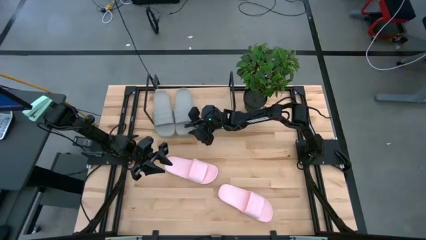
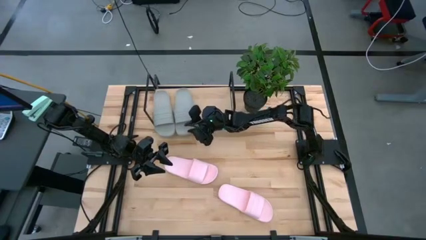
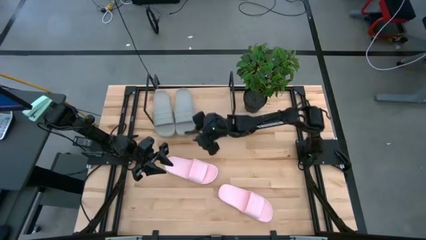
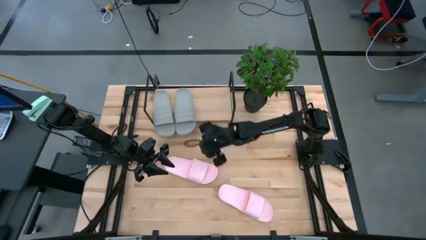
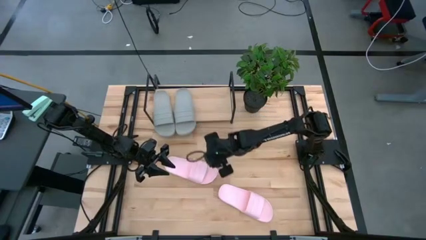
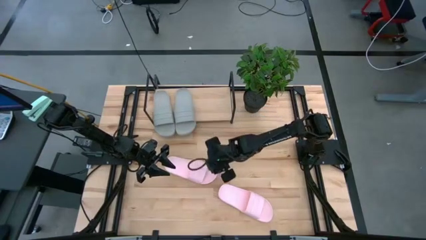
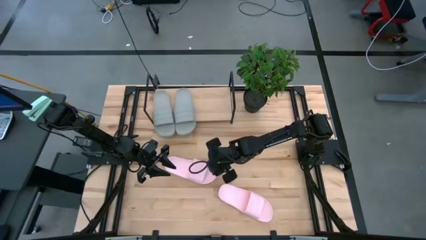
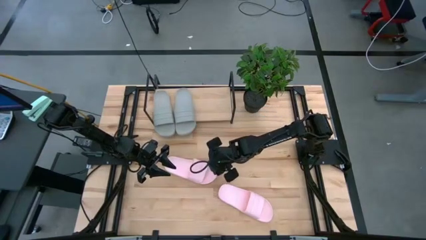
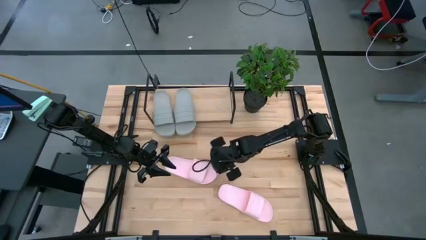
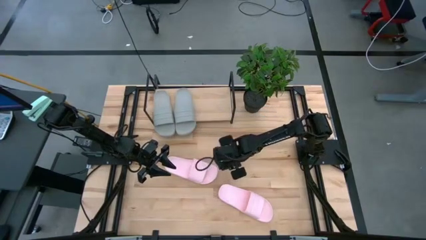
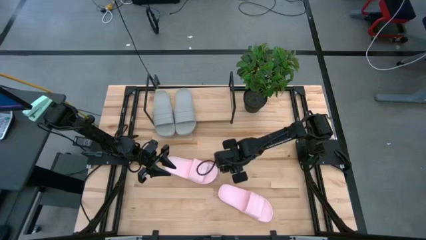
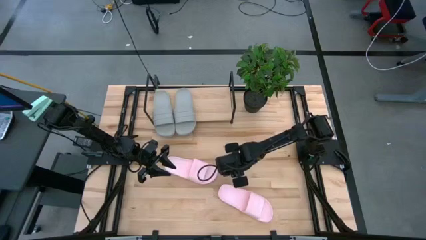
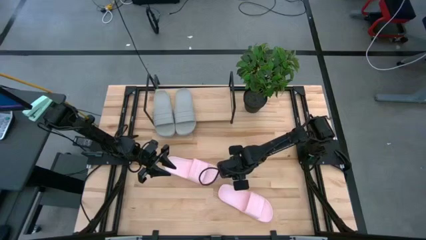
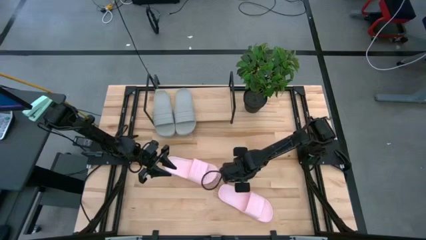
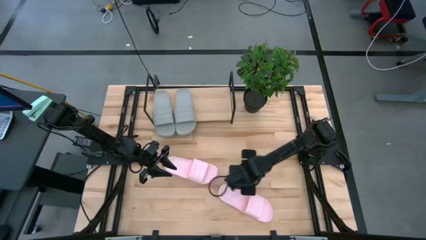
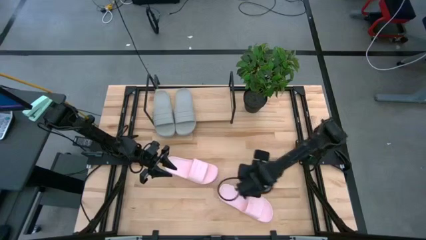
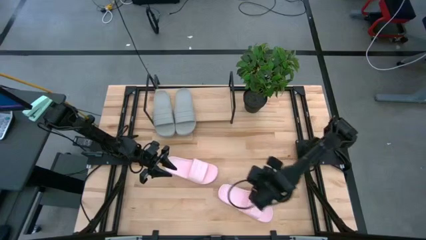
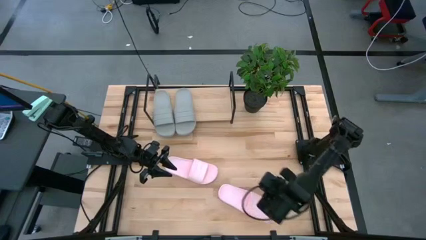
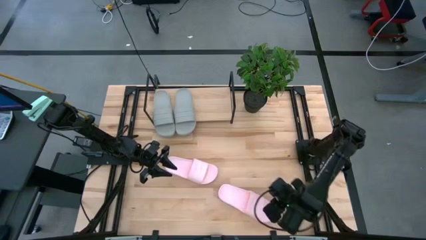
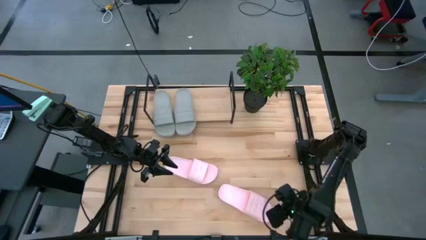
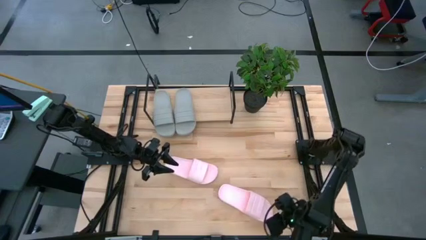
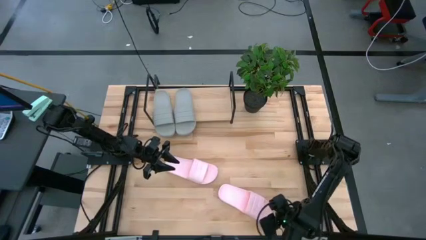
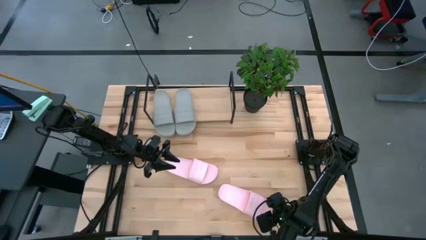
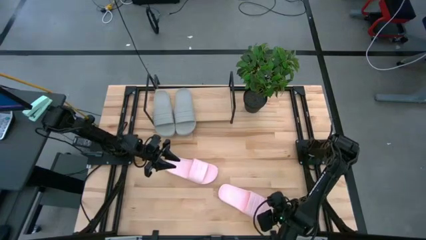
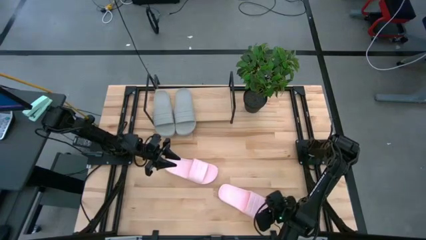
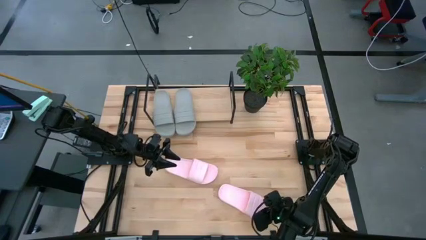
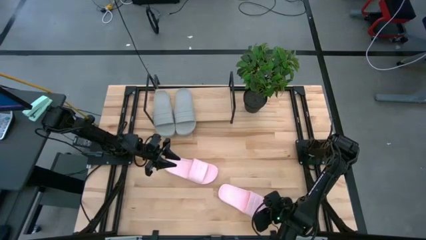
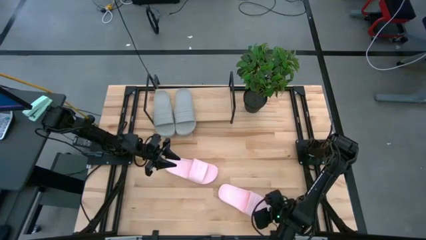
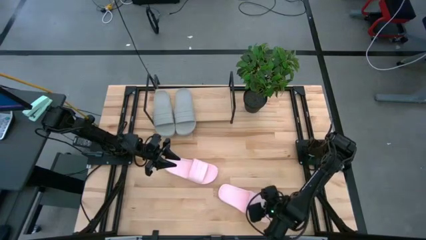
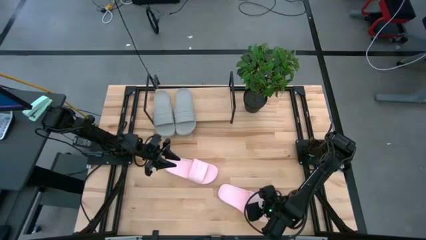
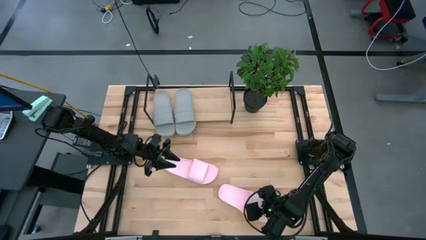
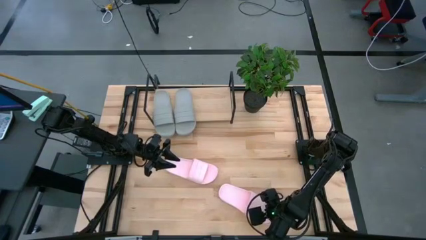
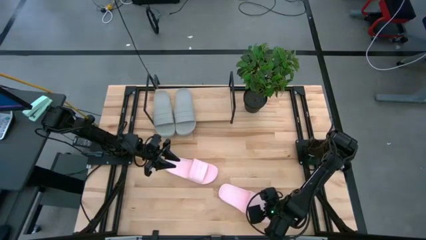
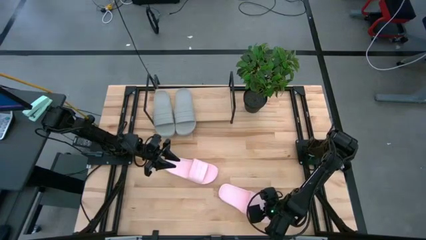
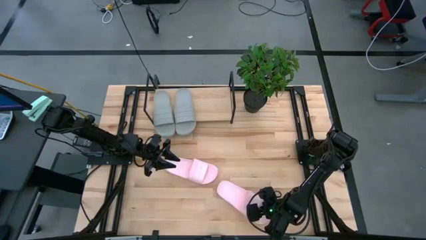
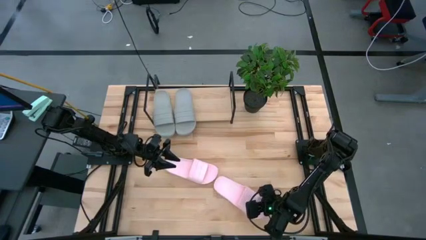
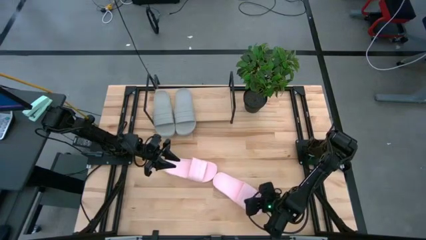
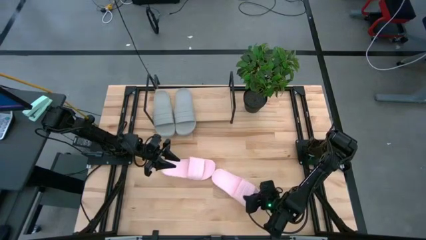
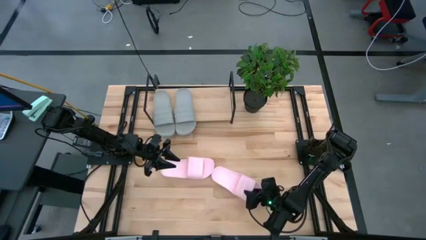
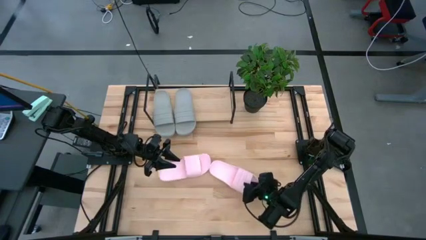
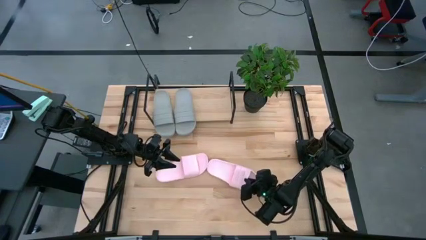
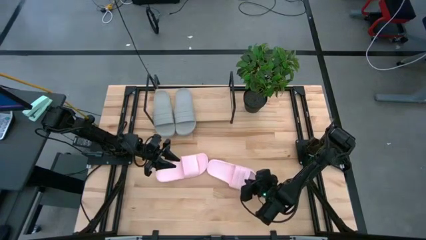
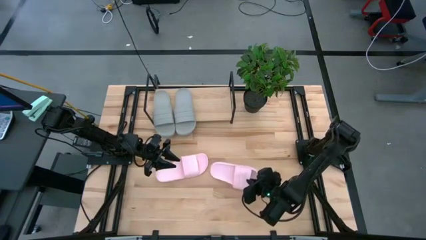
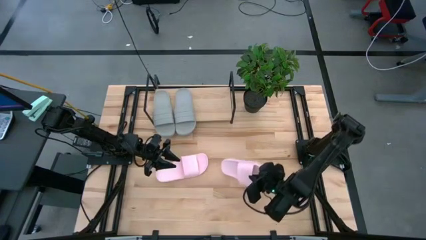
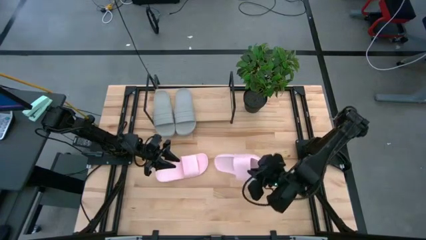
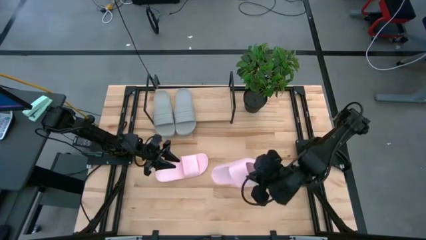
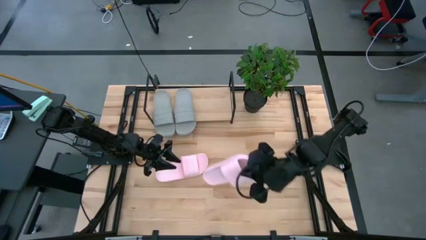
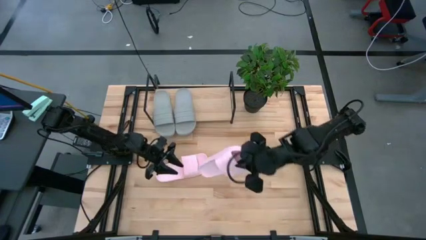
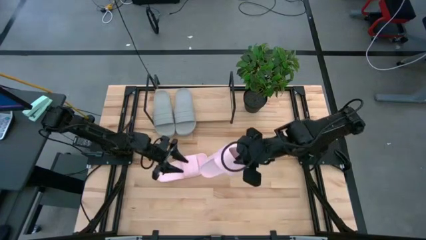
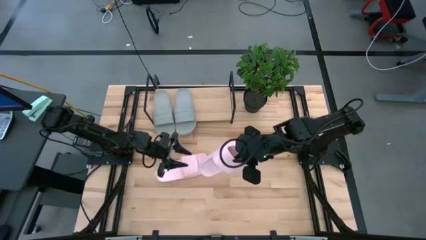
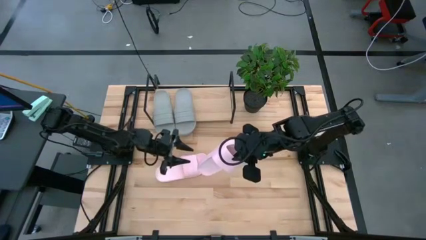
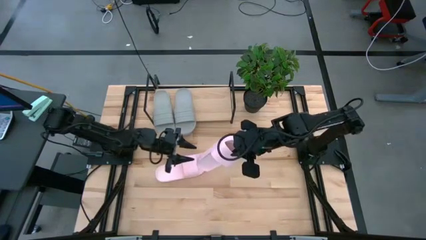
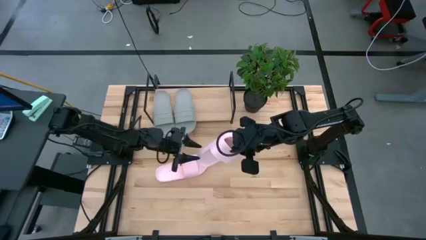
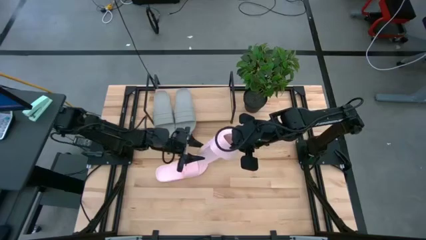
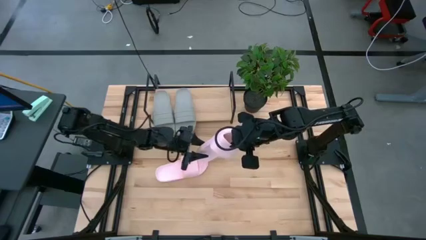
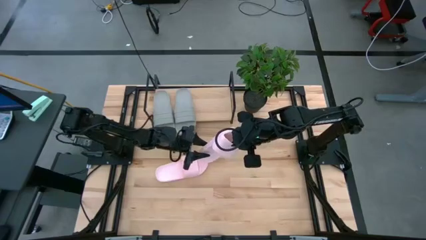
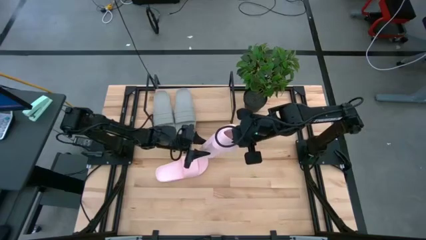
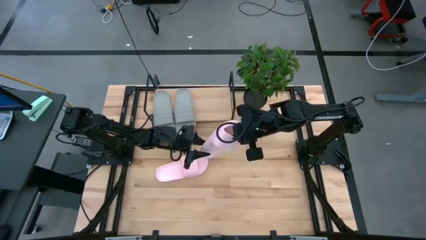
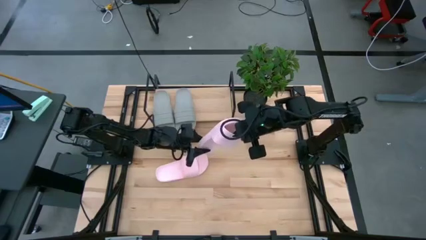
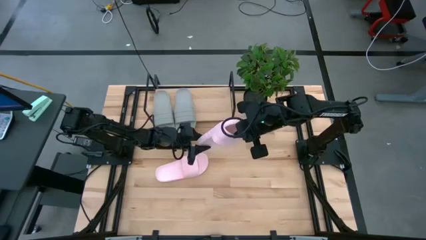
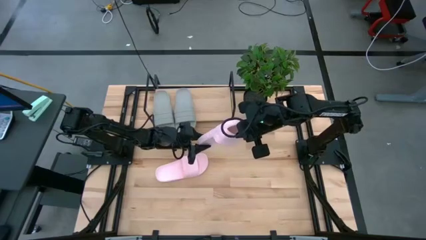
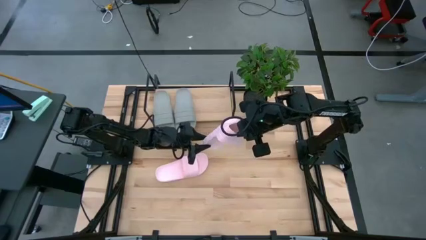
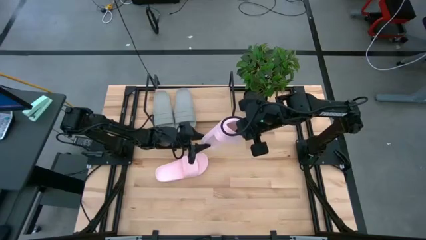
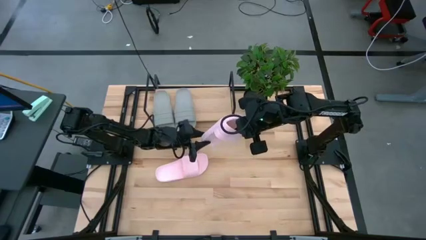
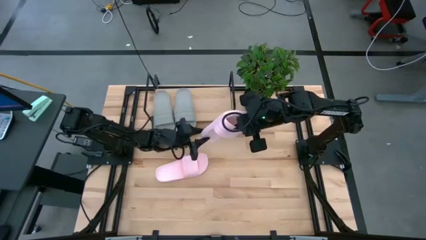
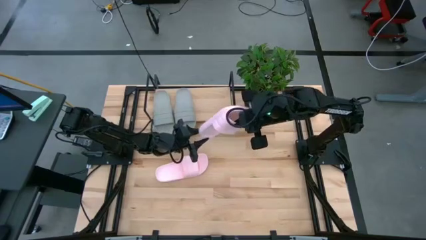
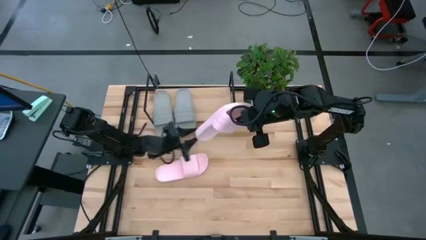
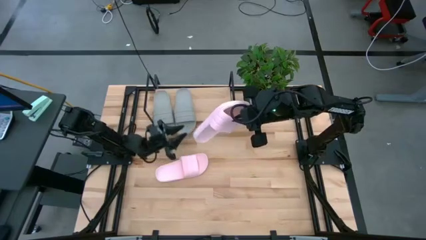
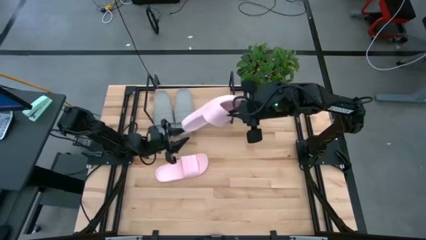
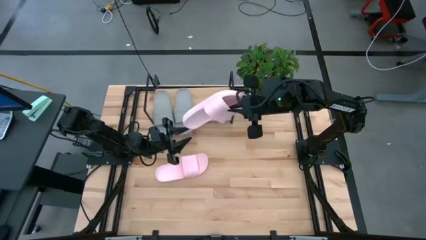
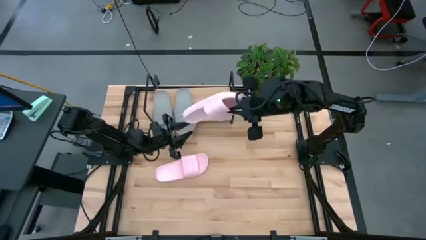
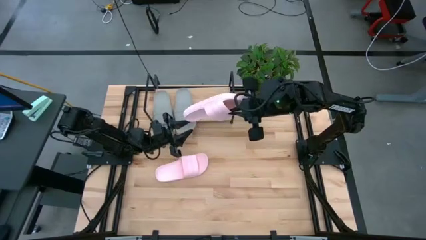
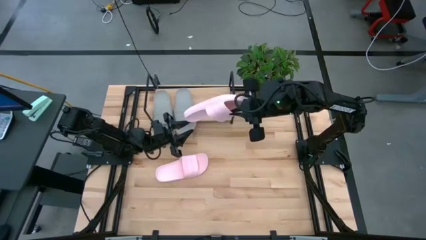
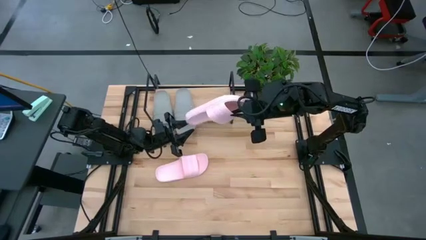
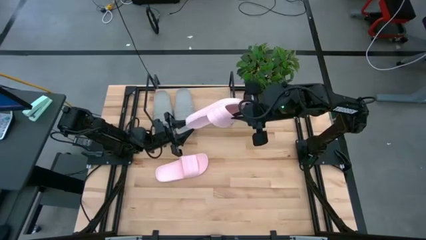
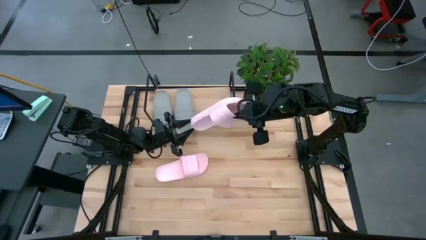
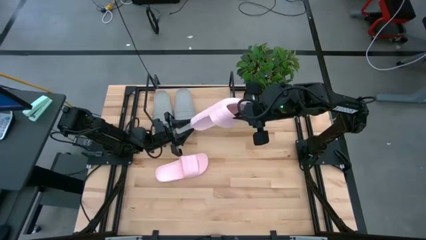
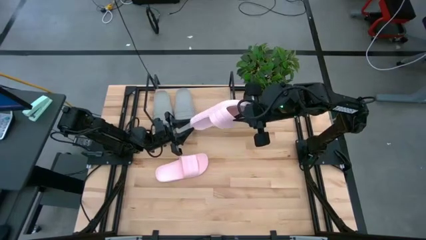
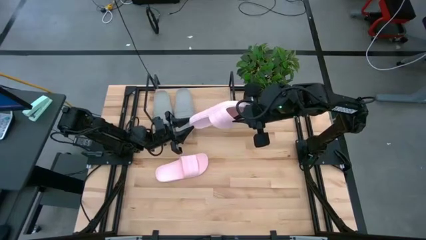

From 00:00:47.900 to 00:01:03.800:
Task: Pick and place slides into the shelf
Put the right pink slide on the shelf
